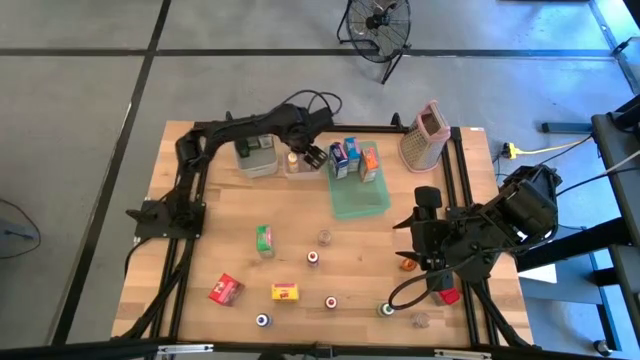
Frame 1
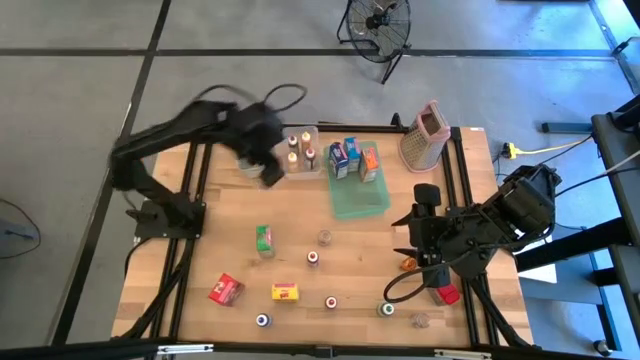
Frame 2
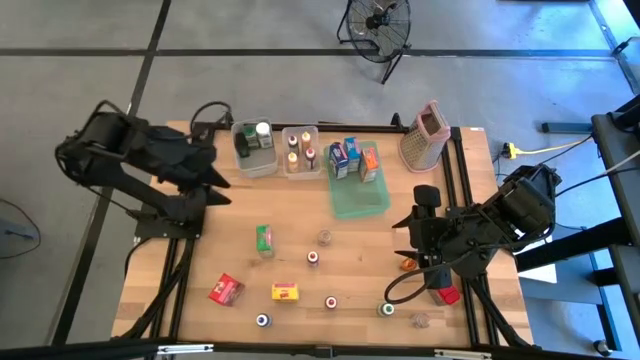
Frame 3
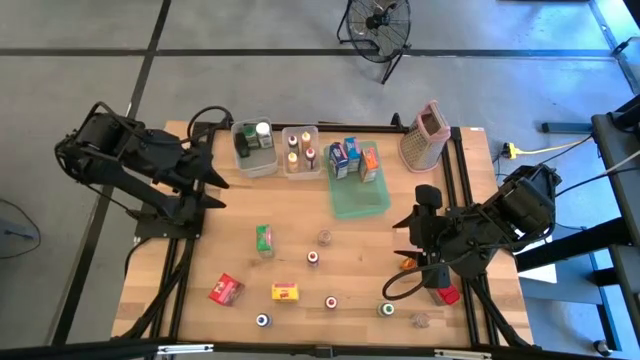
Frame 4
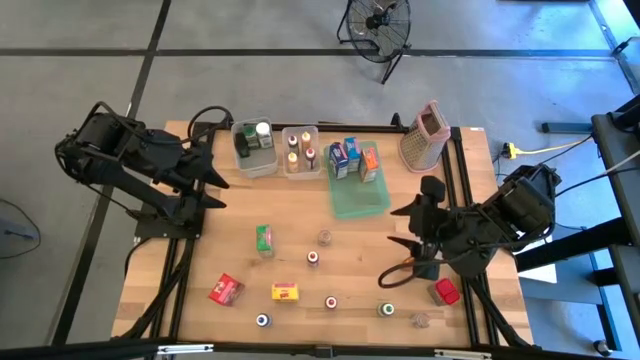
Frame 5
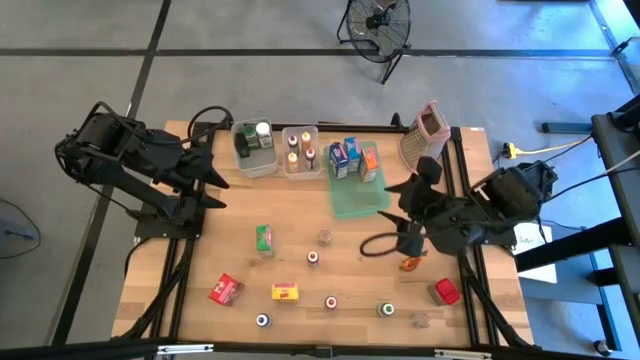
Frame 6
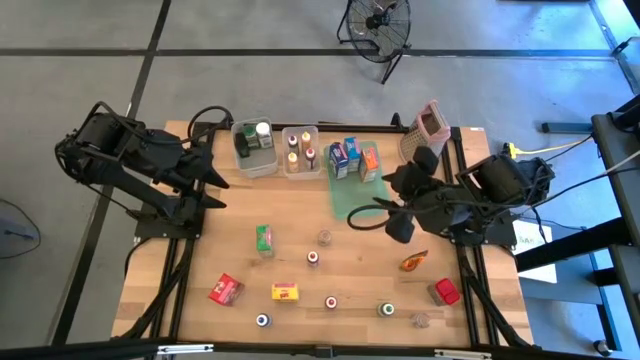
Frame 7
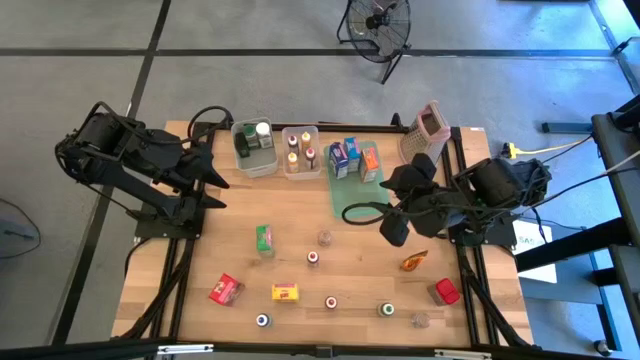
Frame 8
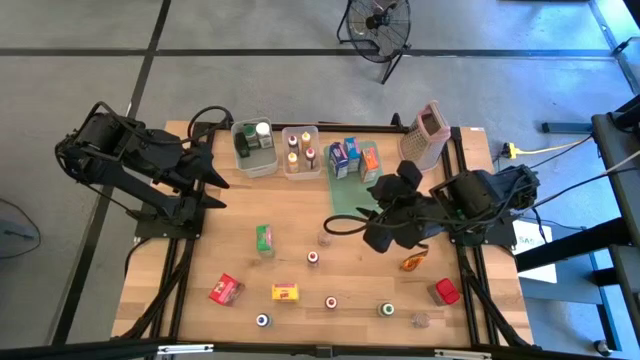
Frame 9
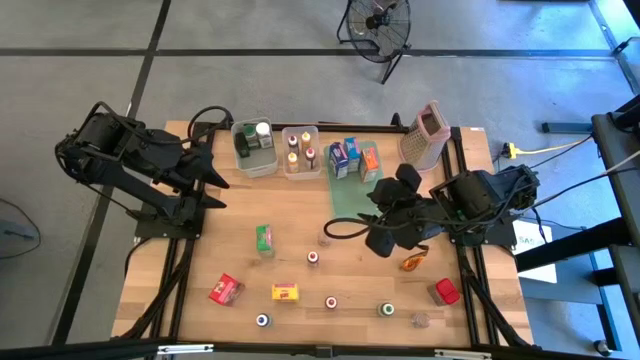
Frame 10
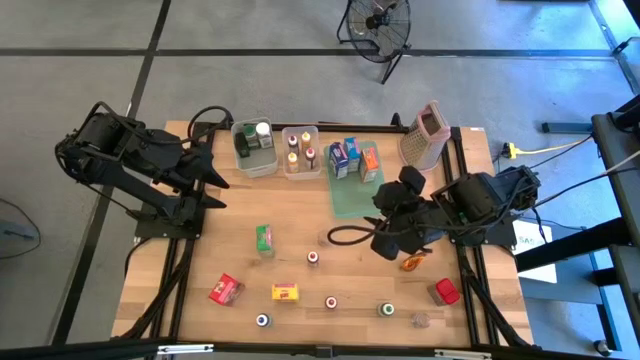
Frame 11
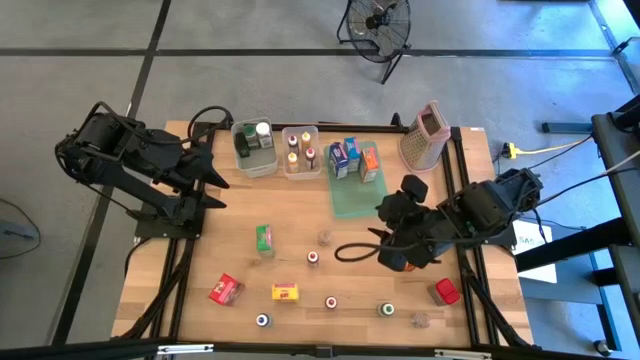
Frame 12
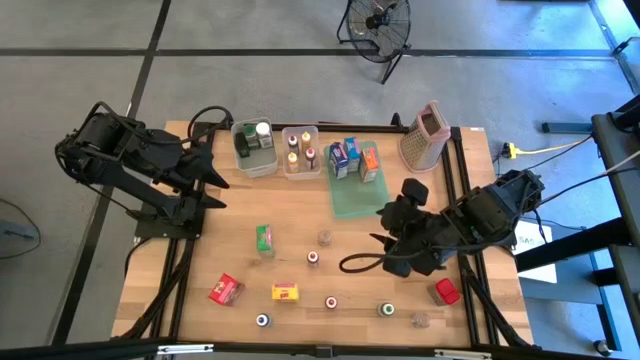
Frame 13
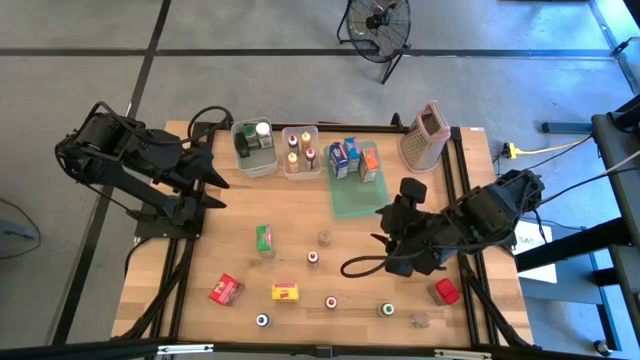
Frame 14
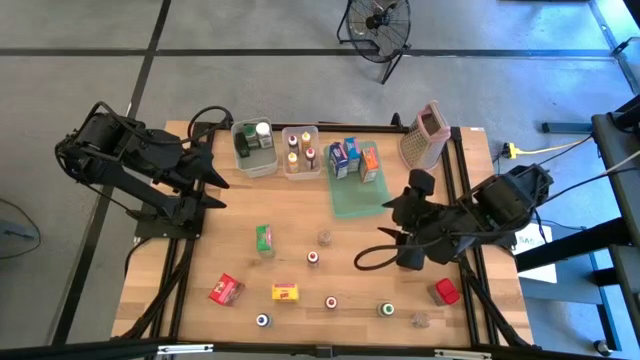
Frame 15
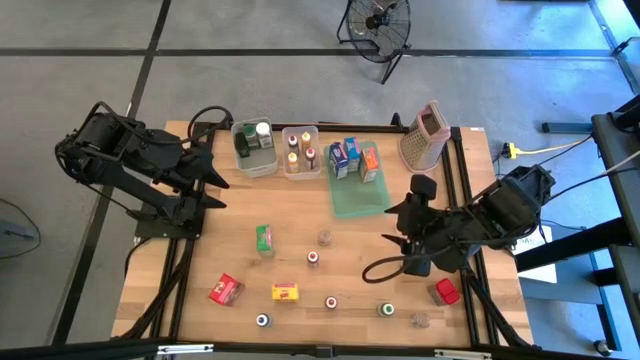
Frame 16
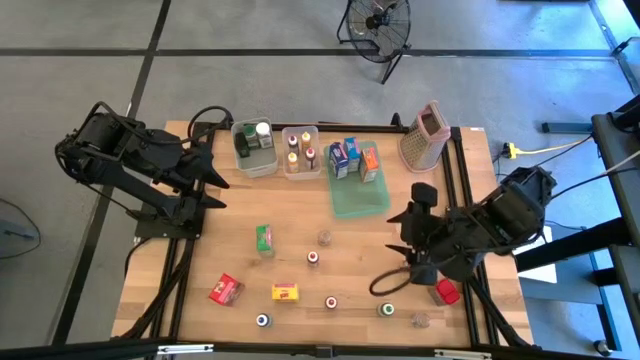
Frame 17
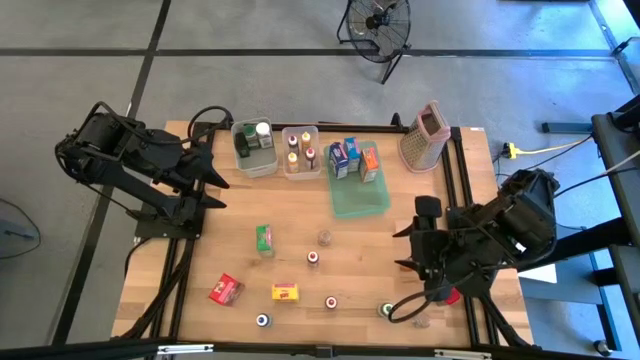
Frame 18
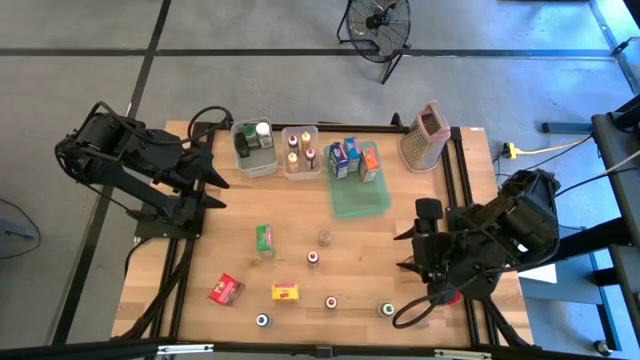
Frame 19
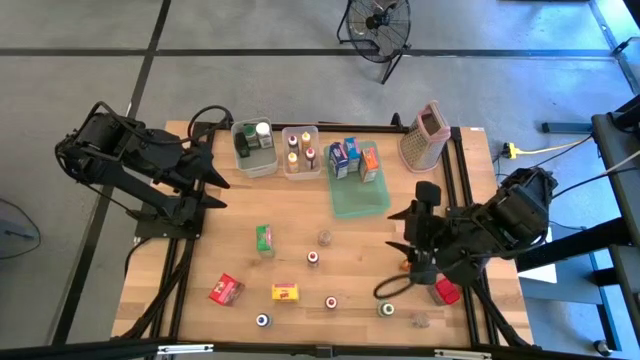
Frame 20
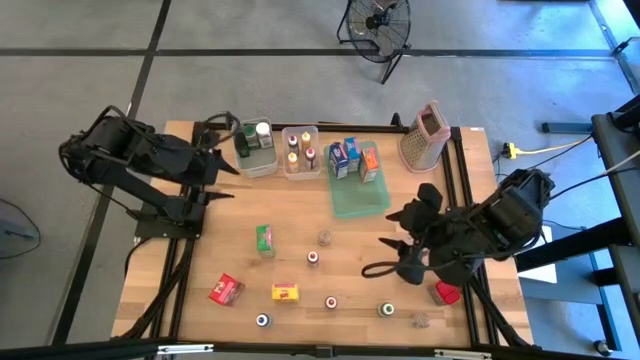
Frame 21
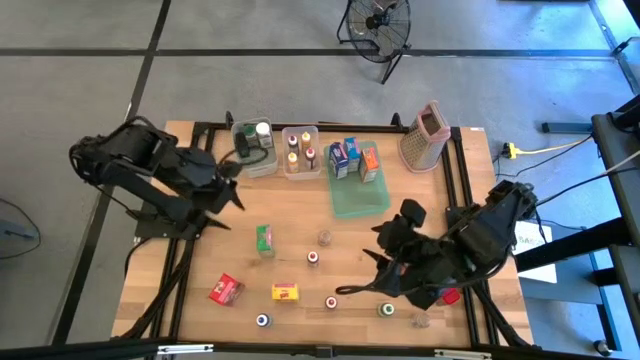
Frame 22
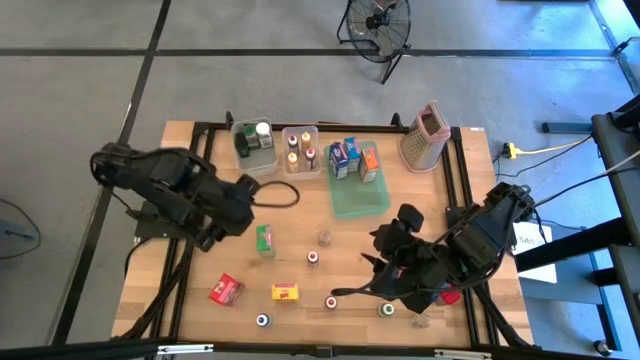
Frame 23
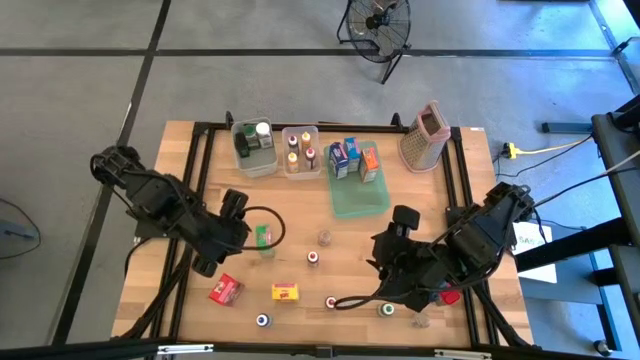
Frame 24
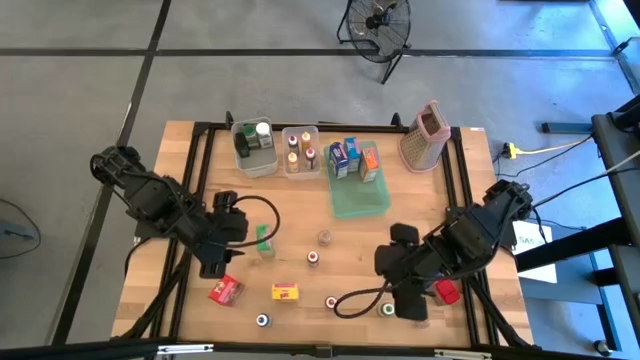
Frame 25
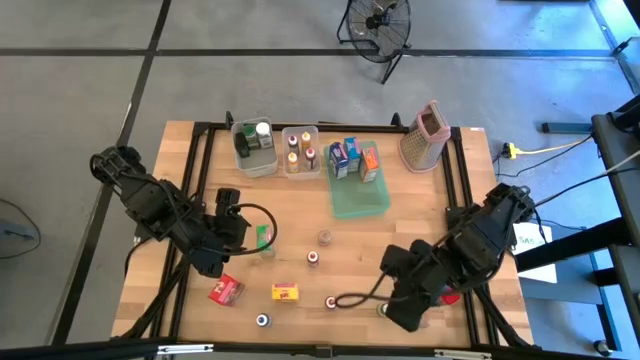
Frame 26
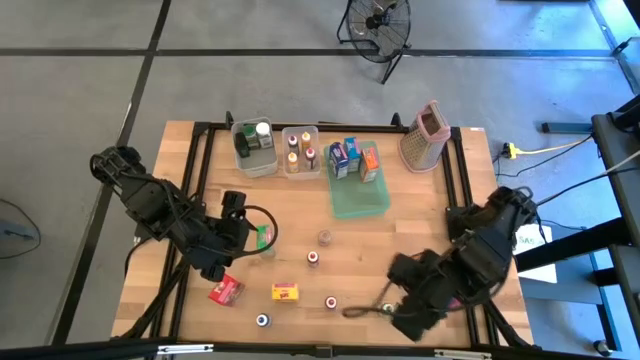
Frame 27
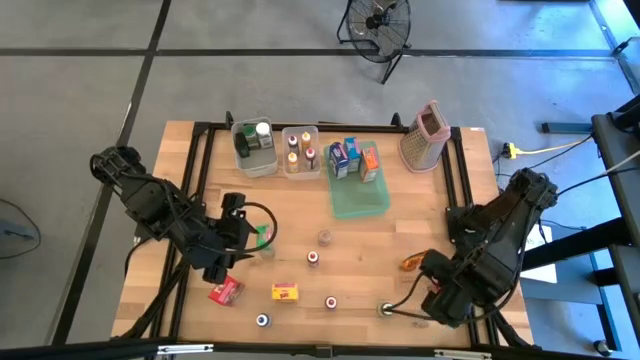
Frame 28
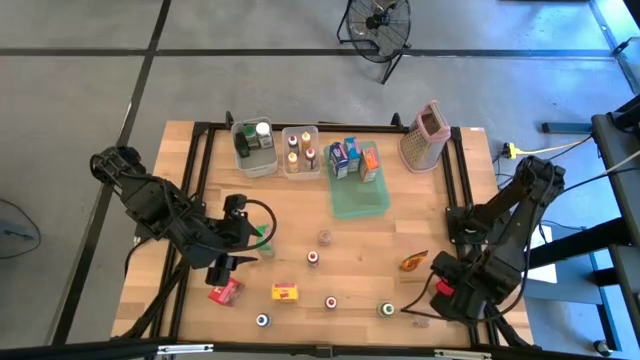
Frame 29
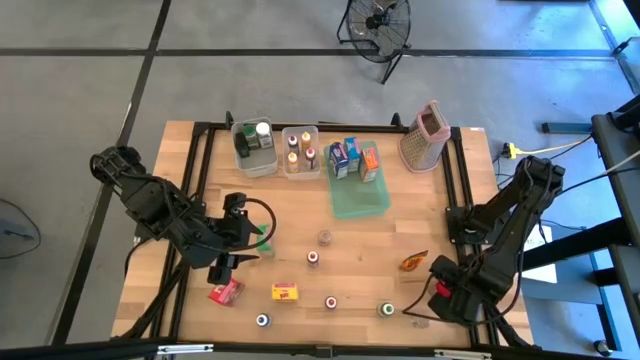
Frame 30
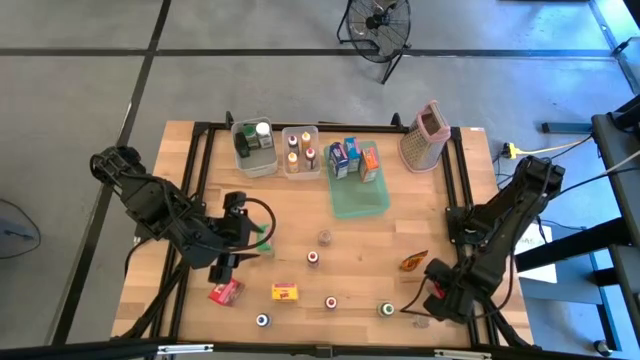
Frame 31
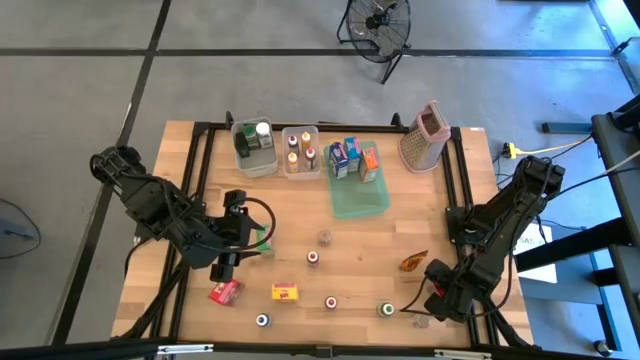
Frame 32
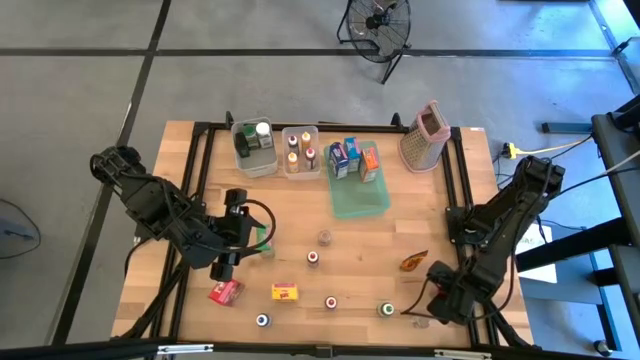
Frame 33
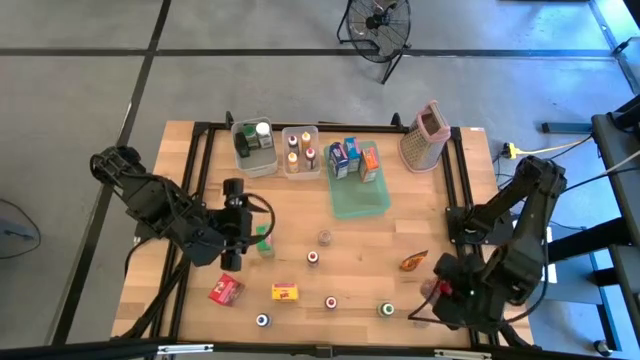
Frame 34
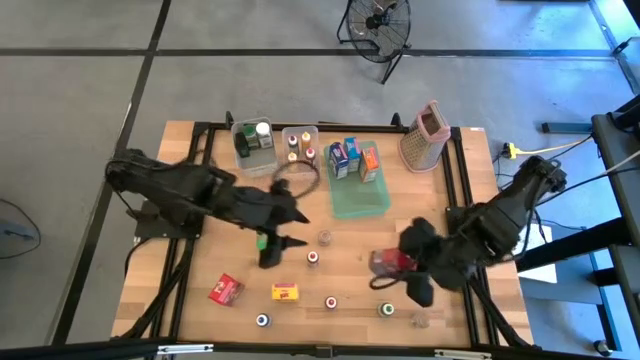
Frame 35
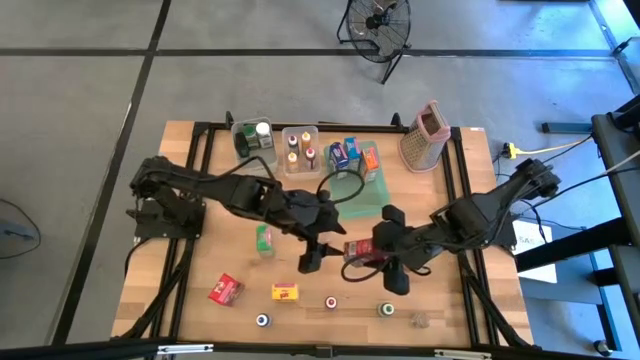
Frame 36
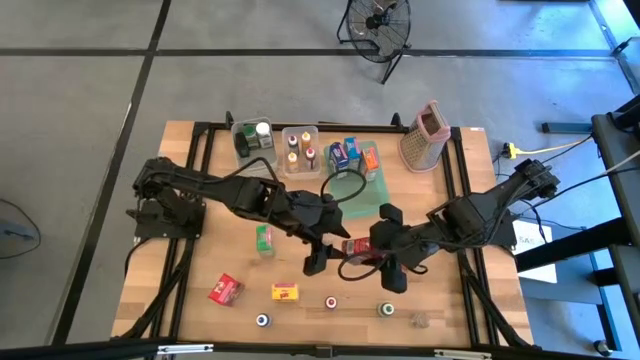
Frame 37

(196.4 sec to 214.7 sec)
Task: Pick & Place Kitchen Items
Put the red spice can into the gray bin

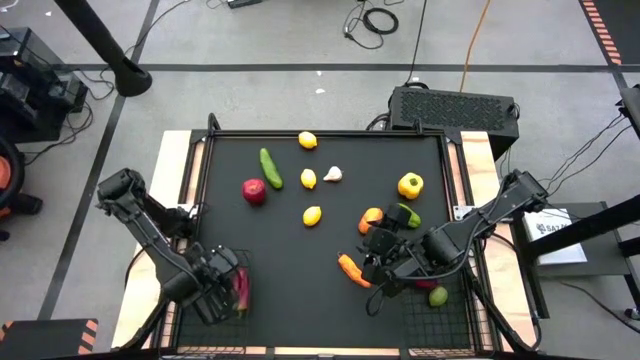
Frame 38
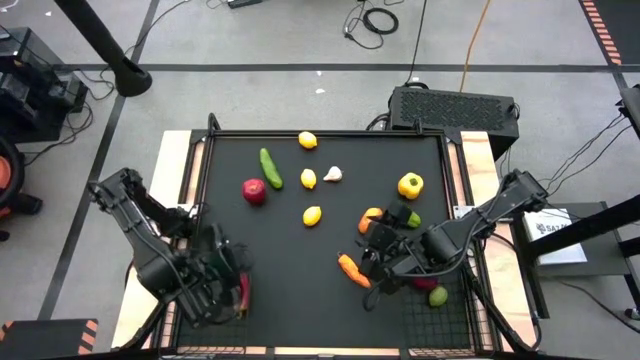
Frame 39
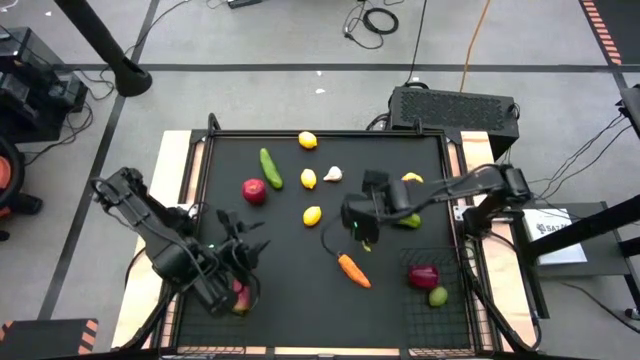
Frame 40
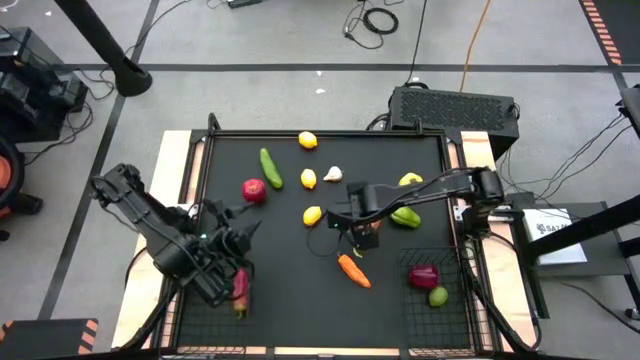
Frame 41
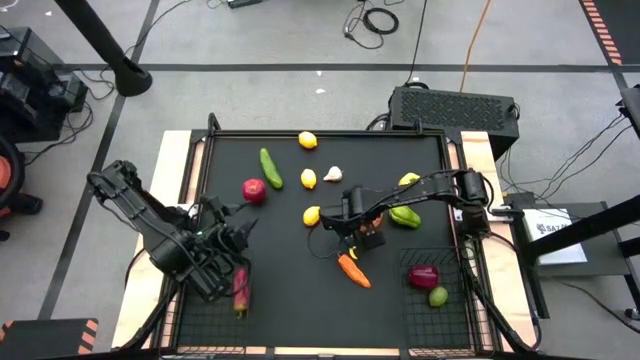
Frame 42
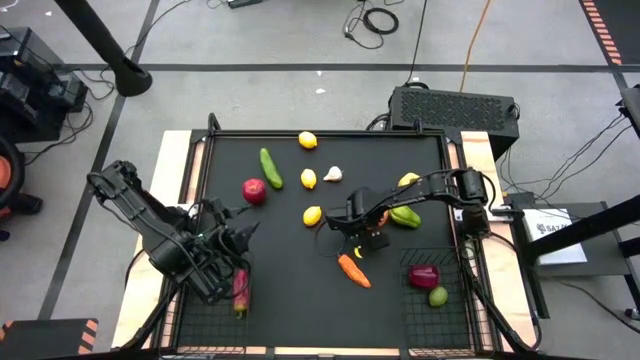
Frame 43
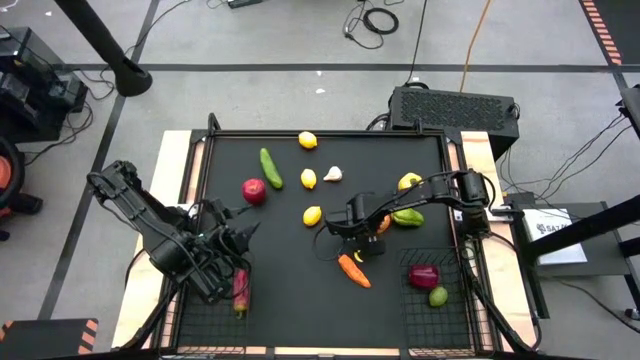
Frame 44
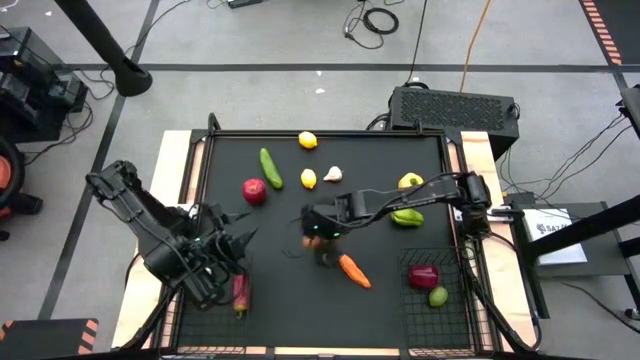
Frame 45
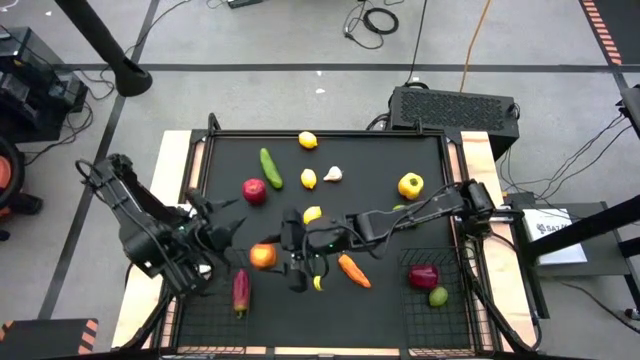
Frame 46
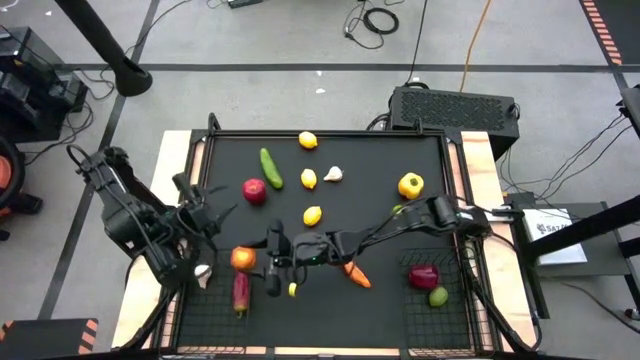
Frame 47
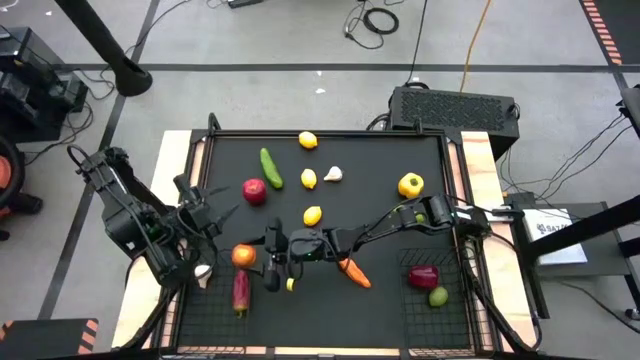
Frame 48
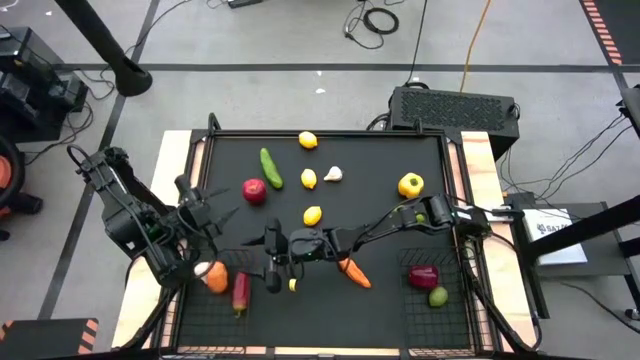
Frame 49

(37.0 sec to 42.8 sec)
Task: Sort produce into baskets
Put the ripe mango into the bottom left basket
